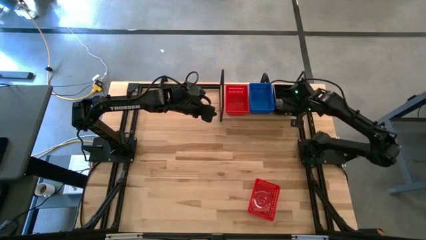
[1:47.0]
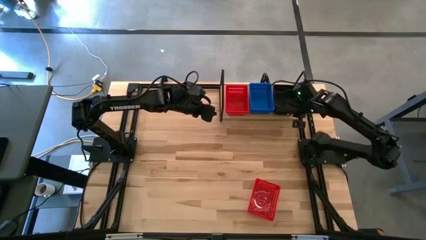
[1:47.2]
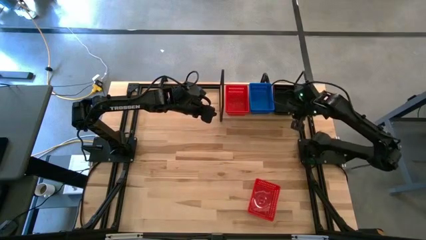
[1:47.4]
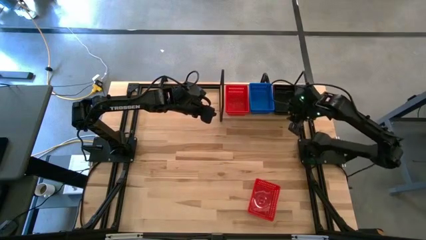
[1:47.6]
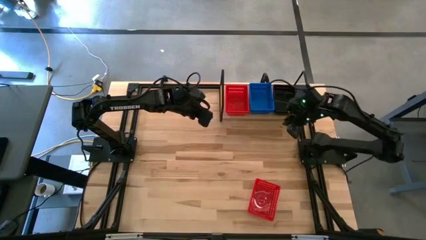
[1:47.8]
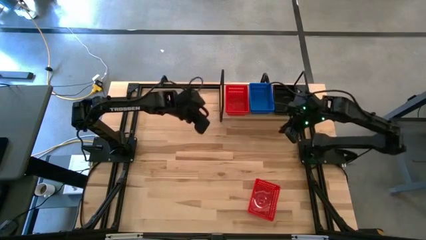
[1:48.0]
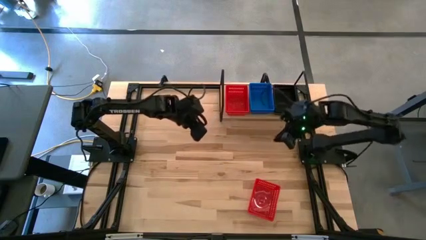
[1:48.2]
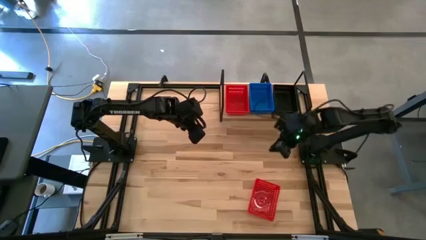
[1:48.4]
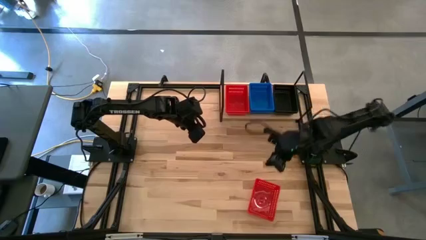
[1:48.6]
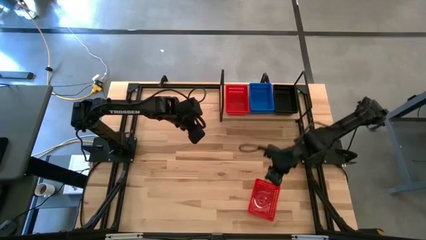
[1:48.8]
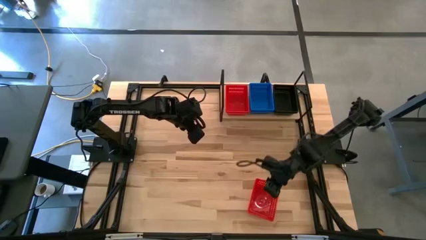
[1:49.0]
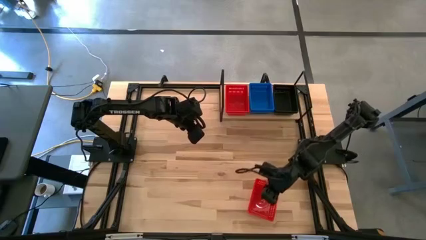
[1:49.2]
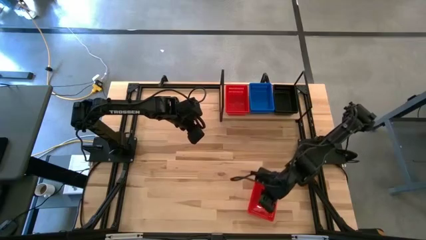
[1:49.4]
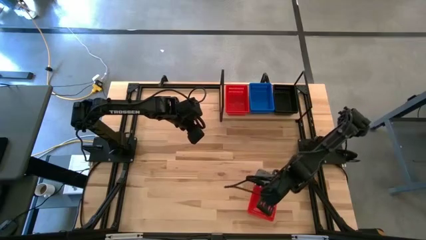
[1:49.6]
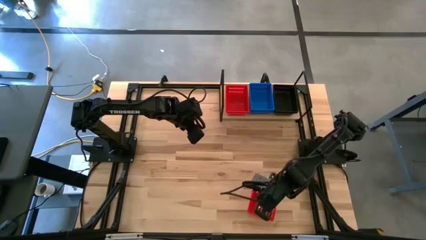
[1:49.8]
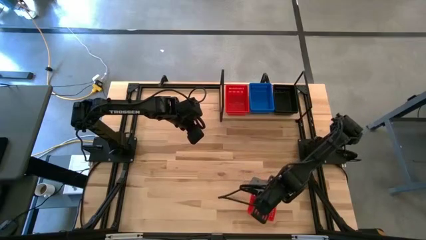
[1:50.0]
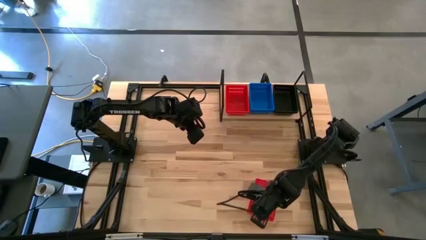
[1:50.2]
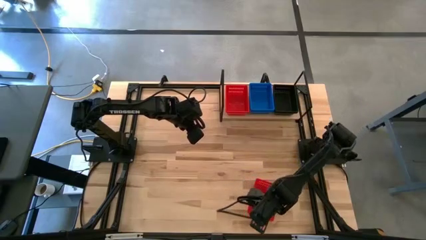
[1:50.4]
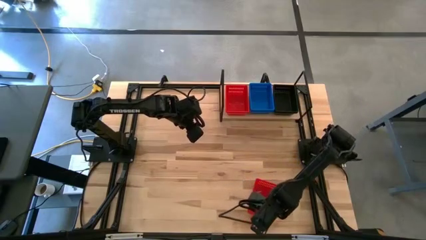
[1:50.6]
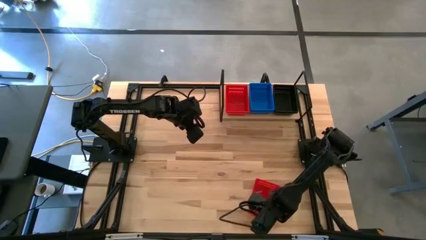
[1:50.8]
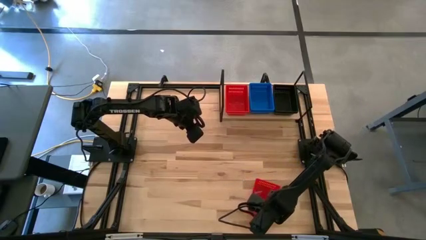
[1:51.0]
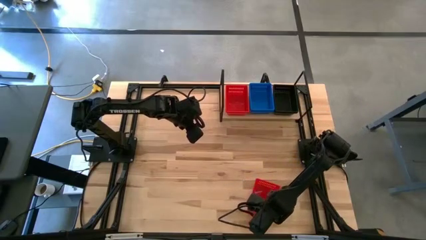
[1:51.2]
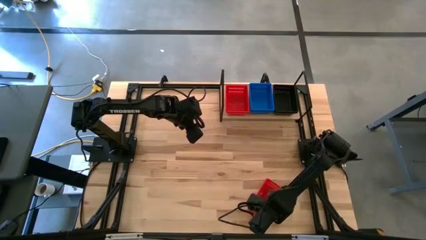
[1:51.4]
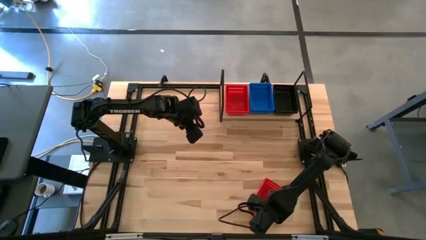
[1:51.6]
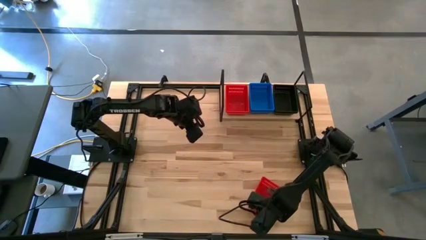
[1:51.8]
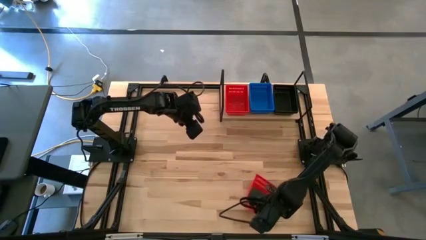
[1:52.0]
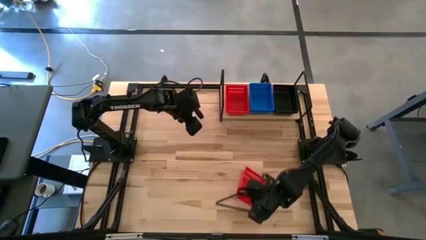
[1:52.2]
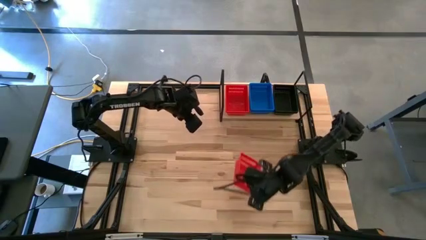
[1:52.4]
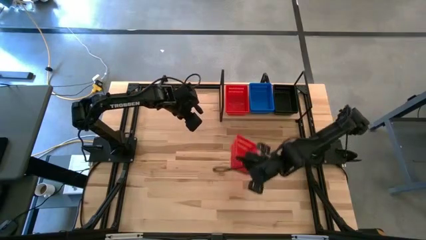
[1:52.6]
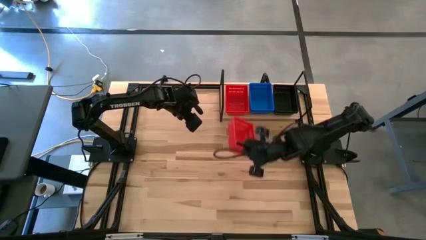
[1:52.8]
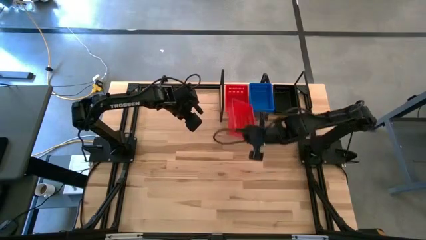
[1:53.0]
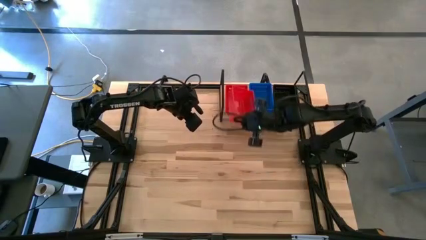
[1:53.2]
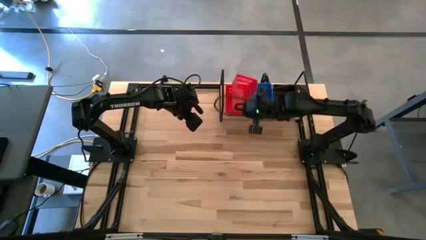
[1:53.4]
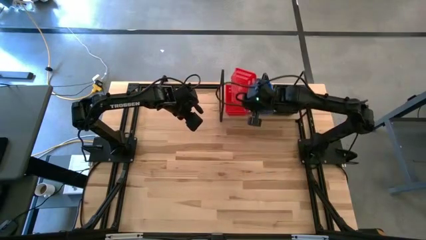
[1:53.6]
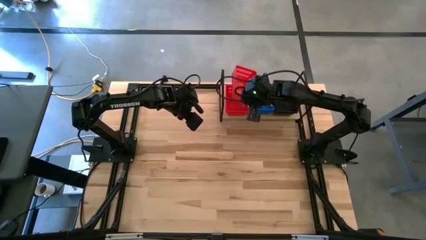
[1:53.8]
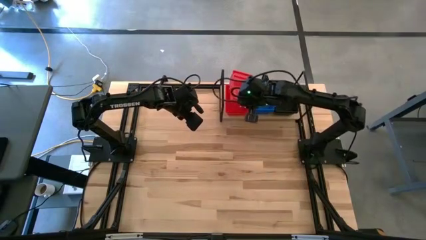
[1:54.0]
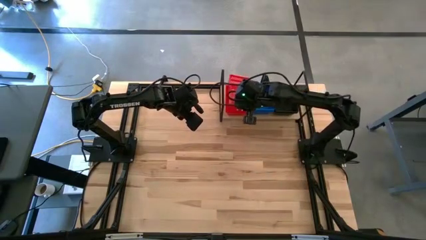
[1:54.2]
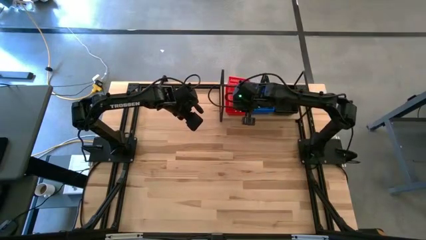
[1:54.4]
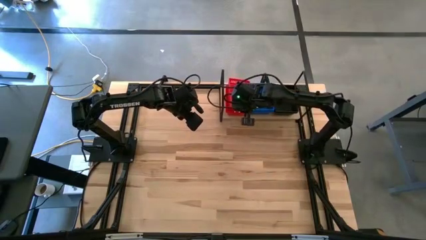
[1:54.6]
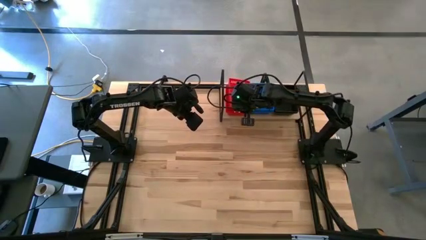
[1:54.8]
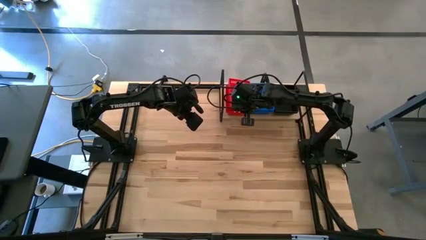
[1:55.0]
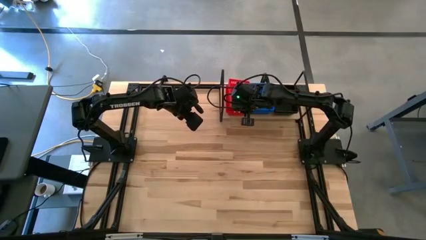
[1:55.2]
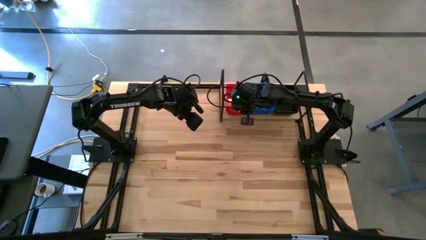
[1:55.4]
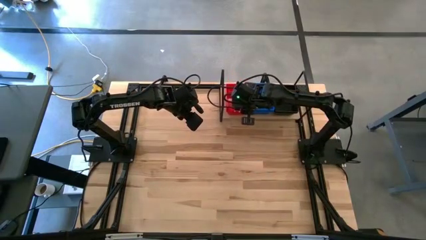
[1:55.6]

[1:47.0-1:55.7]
Task: Stack baskets on shelf by color
Stack the red bin on top of the red bins on the shelf

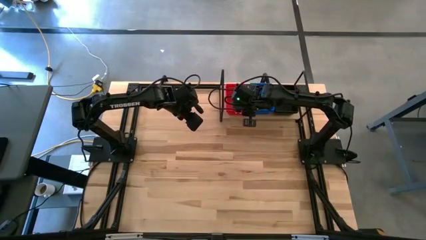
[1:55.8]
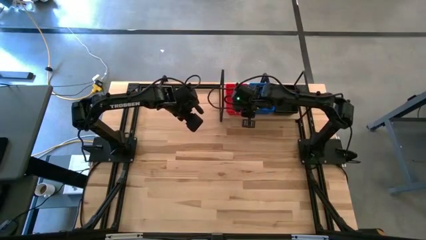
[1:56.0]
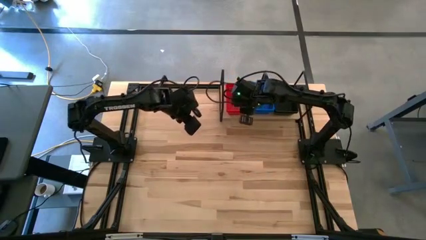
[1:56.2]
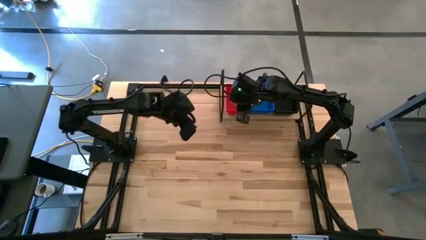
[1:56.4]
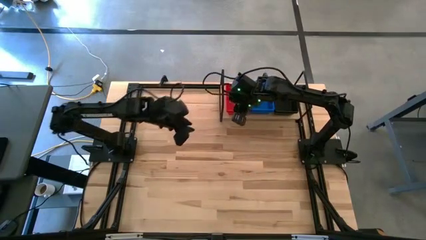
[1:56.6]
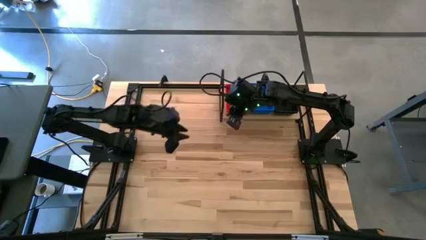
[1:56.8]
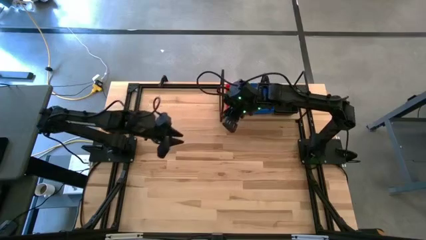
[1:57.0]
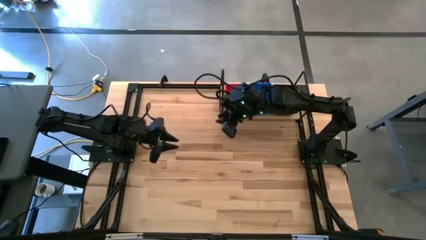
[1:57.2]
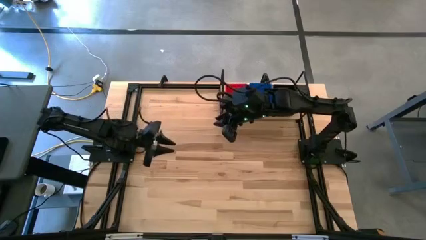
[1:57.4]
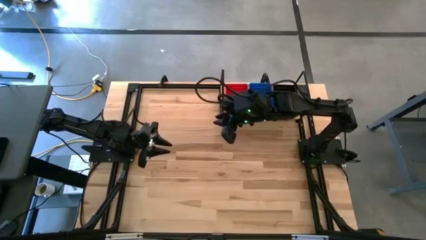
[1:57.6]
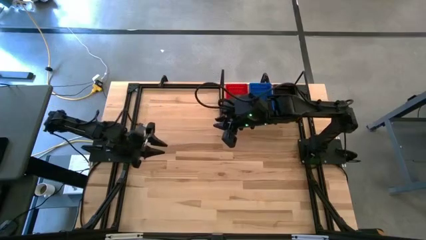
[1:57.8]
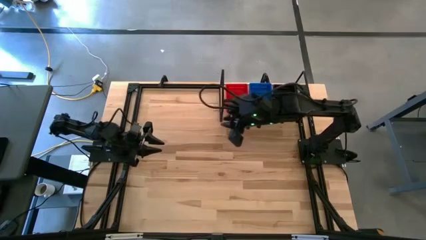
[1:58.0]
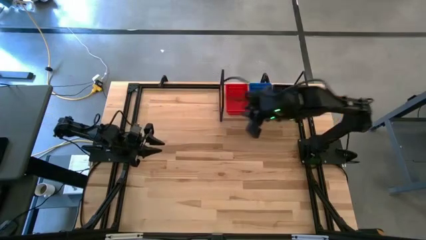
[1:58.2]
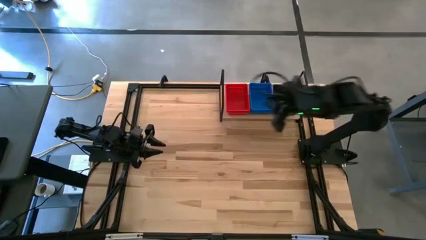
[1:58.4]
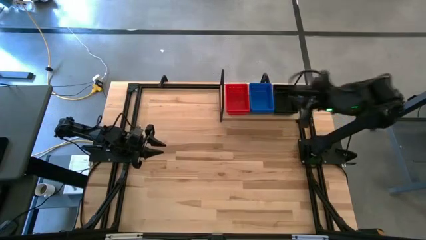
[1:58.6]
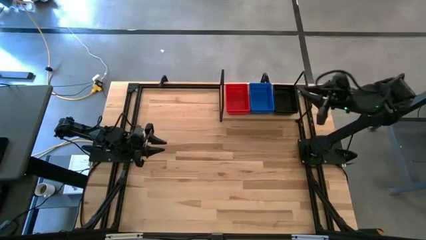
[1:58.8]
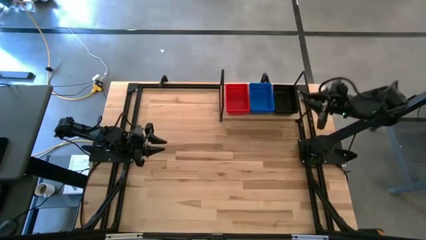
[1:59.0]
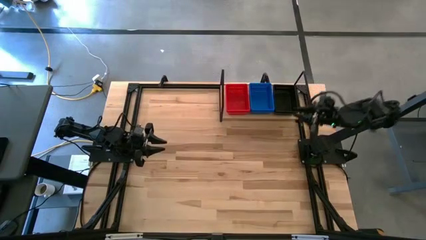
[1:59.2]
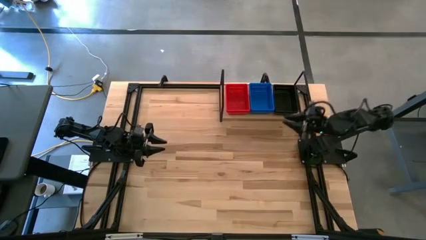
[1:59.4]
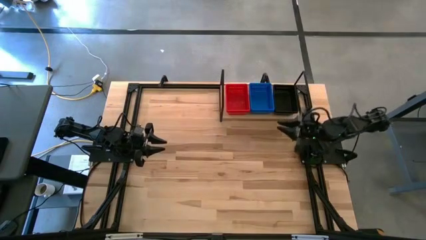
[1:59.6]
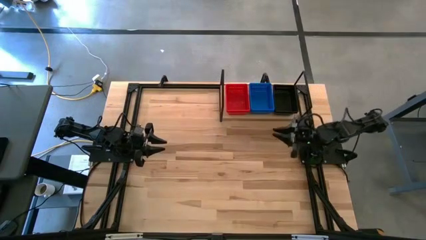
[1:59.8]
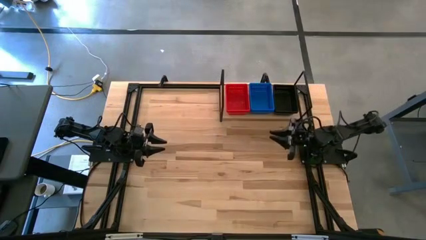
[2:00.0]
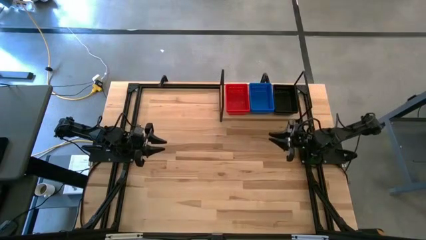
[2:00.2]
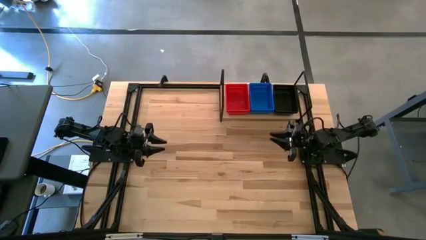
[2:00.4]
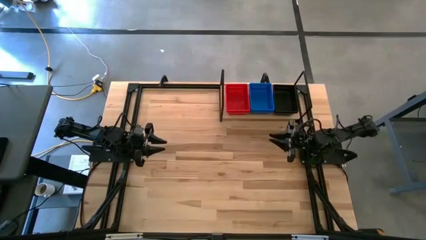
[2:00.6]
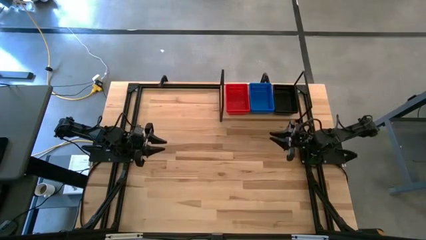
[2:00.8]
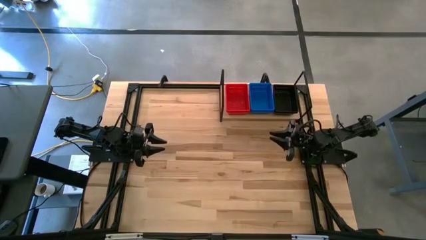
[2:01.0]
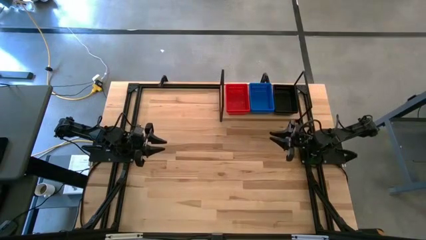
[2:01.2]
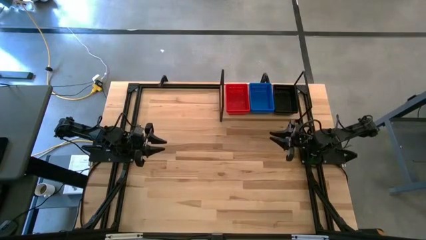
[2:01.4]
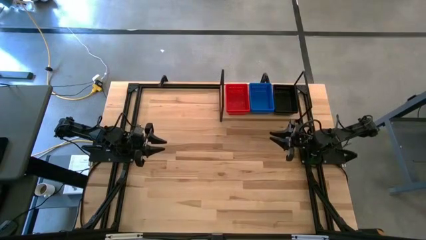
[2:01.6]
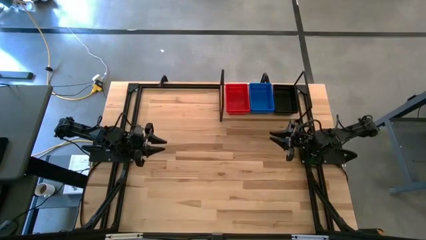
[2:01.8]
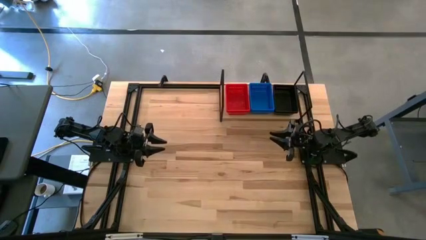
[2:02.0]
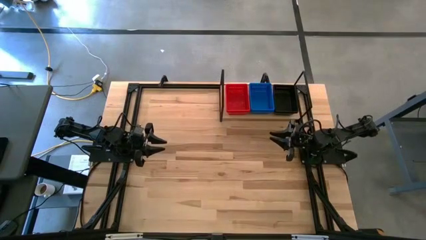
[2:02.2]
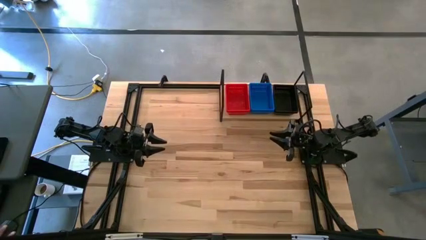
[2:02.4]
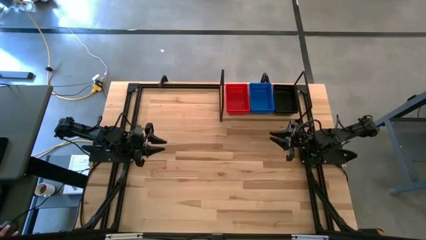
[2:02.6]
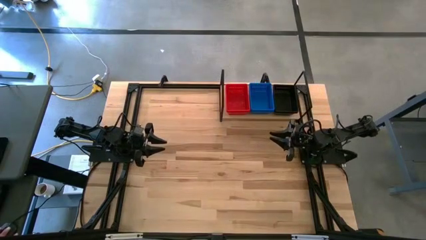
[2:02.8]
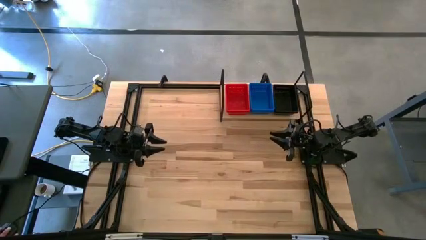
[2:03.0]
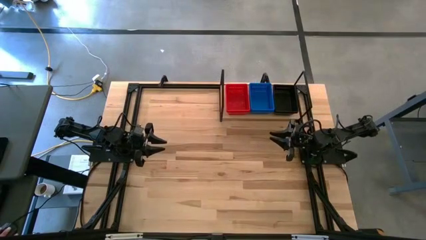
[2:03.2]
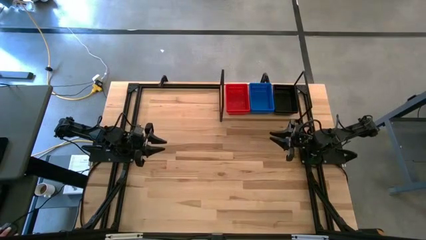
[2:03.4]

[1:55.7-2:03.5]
Return to Home Position
